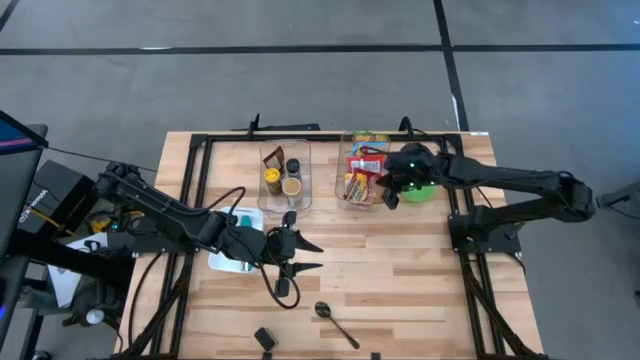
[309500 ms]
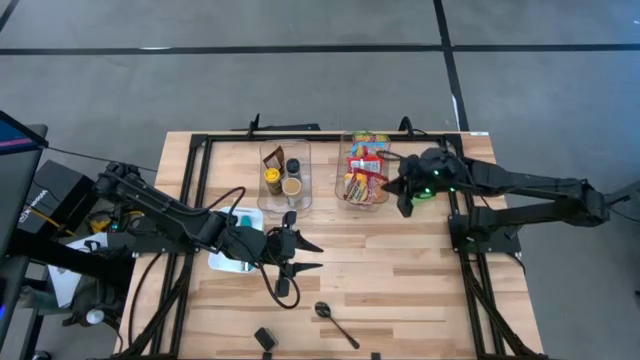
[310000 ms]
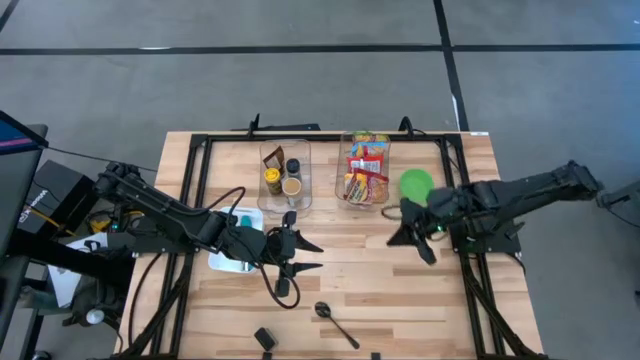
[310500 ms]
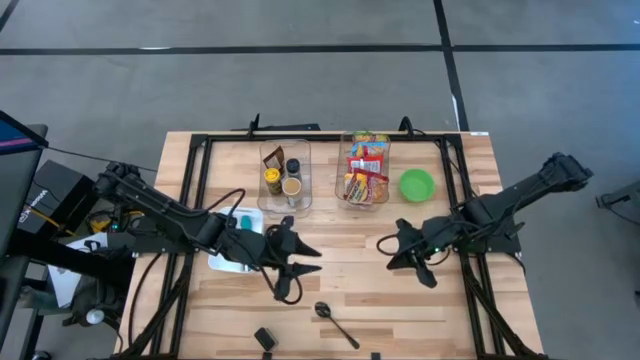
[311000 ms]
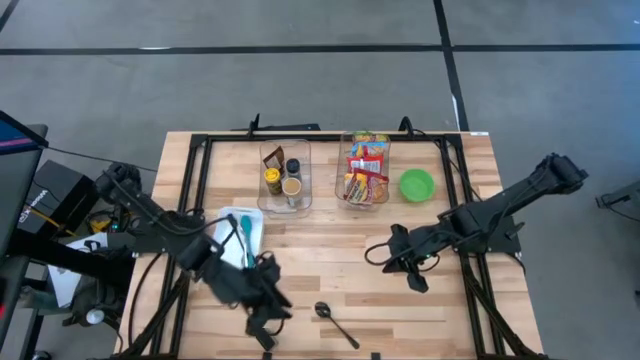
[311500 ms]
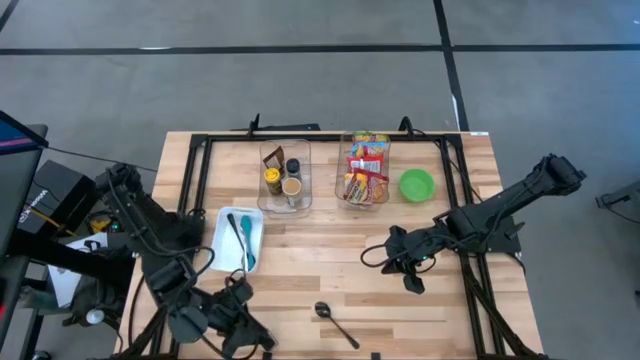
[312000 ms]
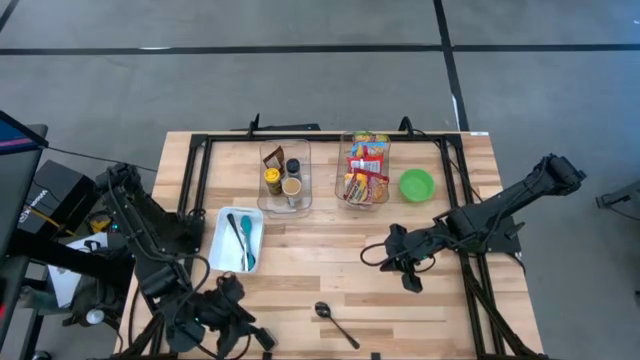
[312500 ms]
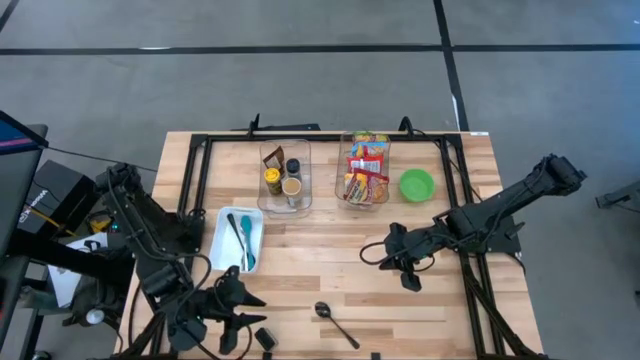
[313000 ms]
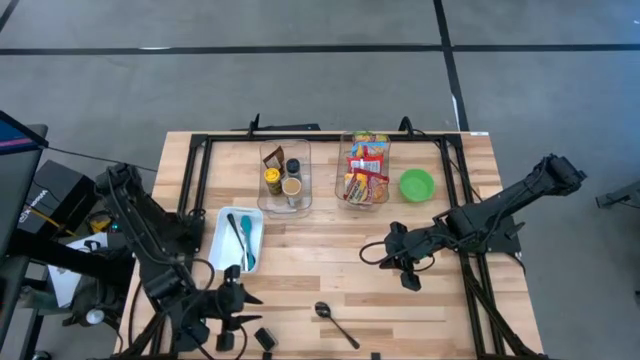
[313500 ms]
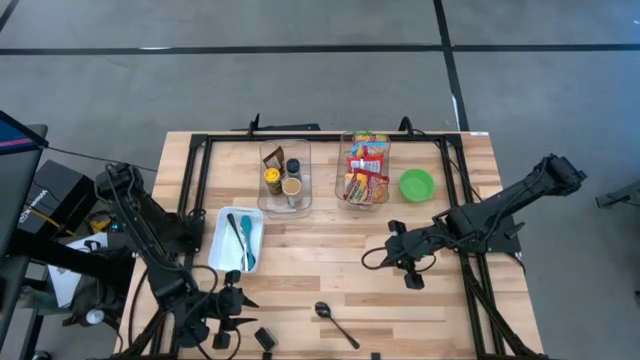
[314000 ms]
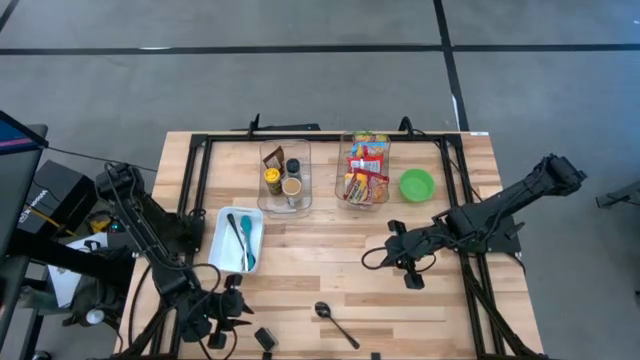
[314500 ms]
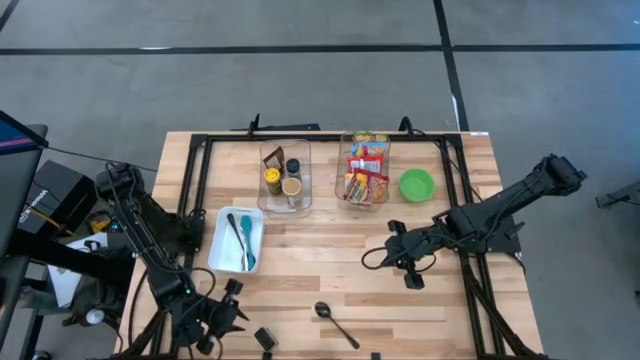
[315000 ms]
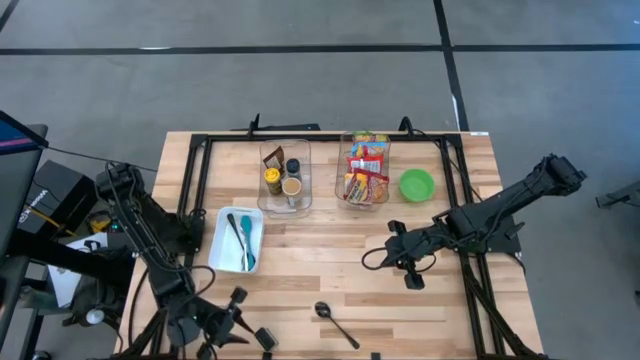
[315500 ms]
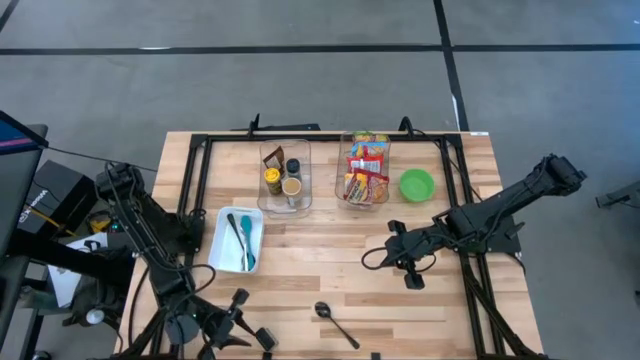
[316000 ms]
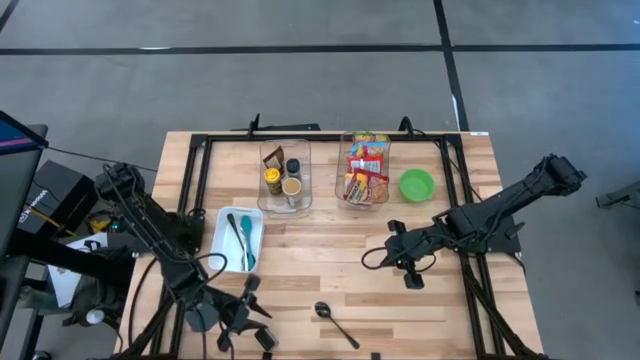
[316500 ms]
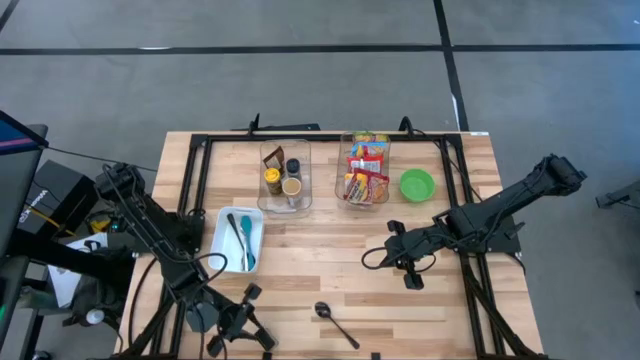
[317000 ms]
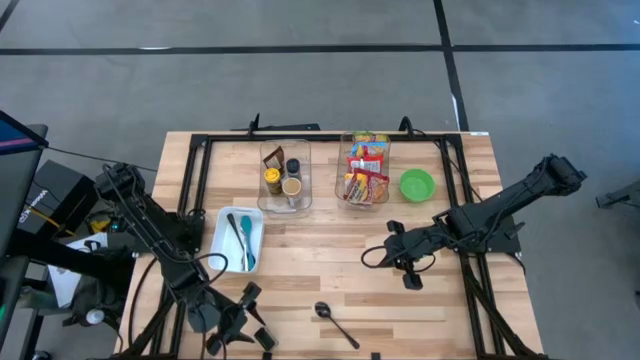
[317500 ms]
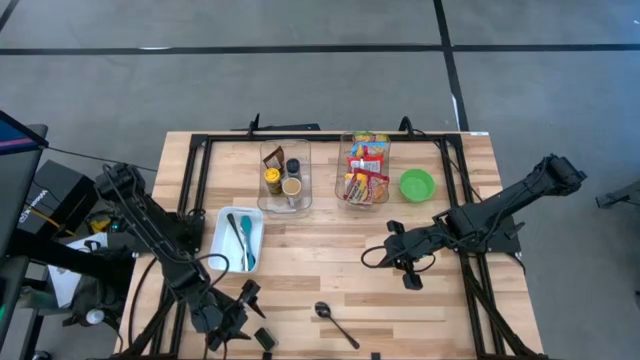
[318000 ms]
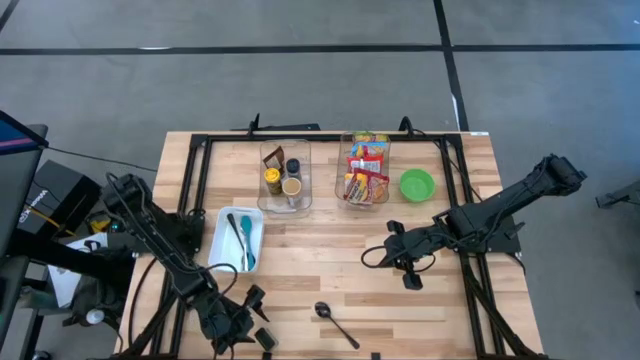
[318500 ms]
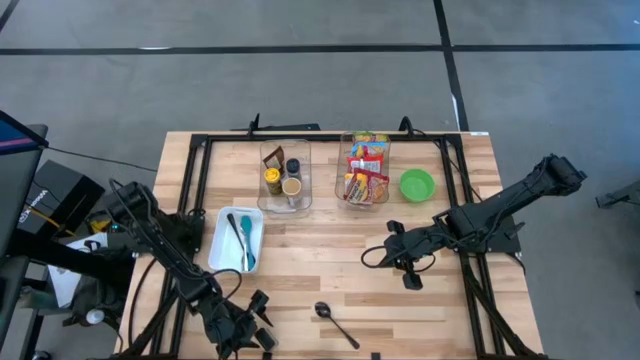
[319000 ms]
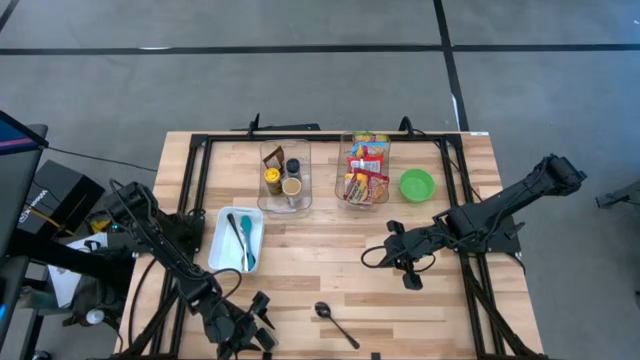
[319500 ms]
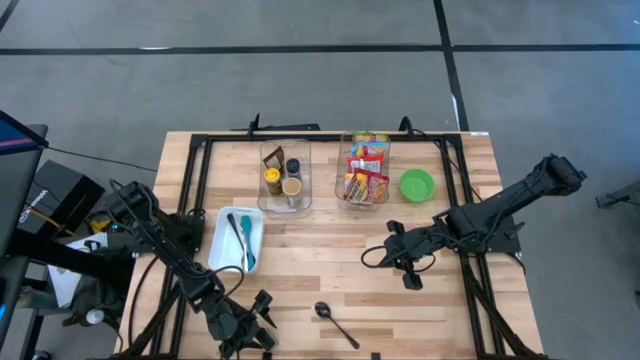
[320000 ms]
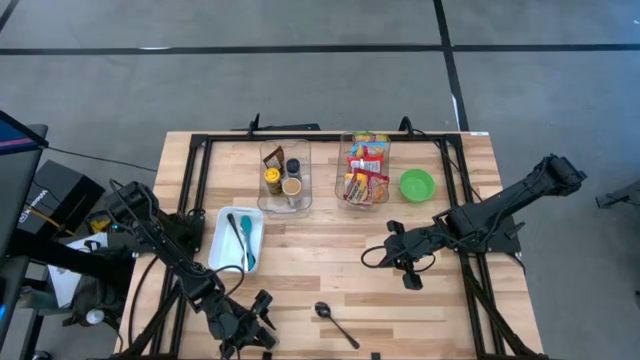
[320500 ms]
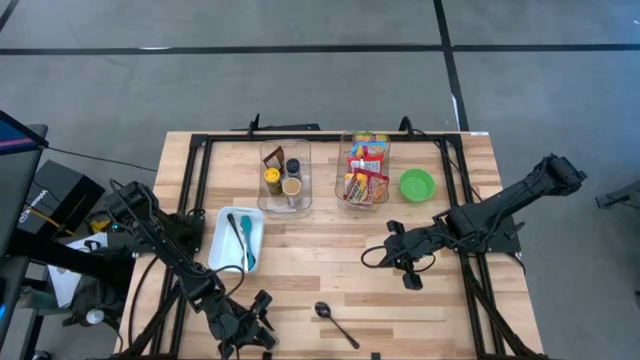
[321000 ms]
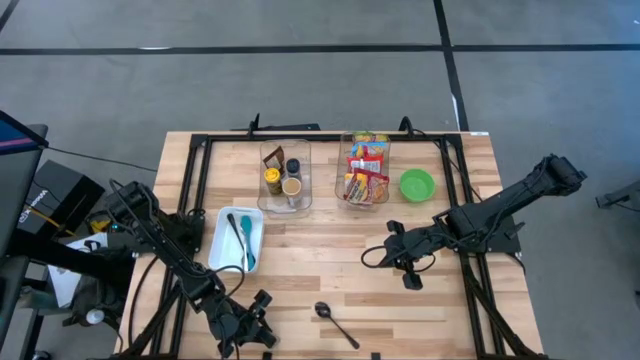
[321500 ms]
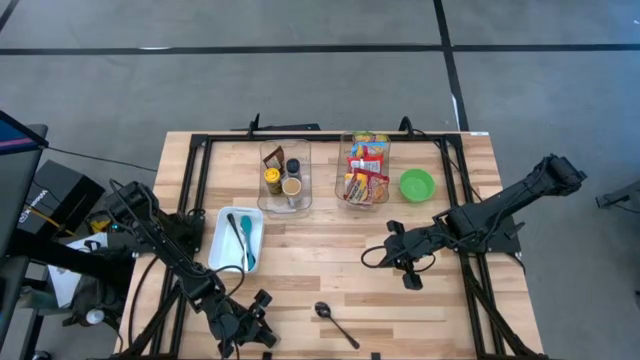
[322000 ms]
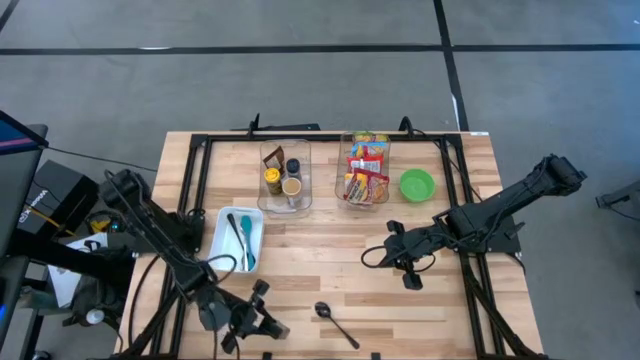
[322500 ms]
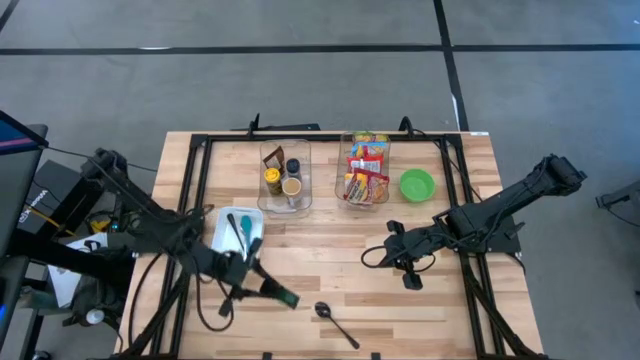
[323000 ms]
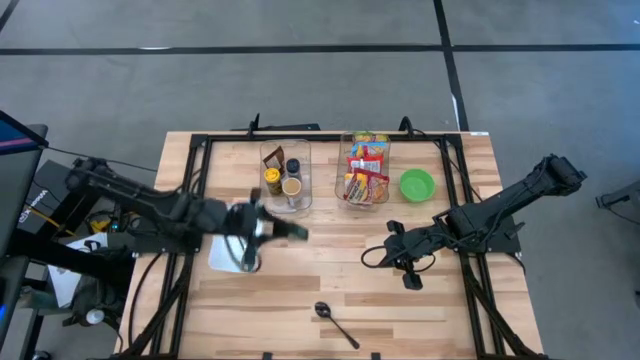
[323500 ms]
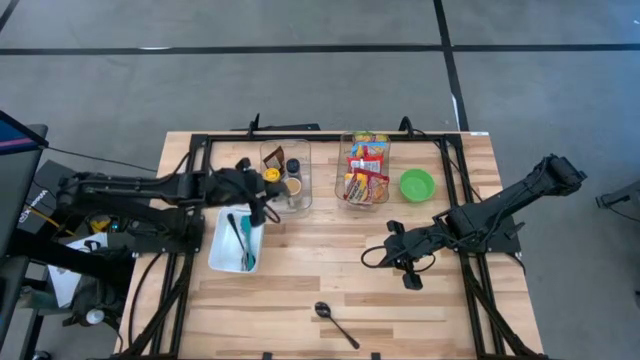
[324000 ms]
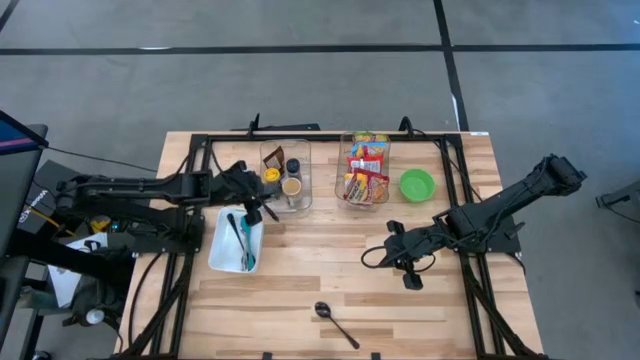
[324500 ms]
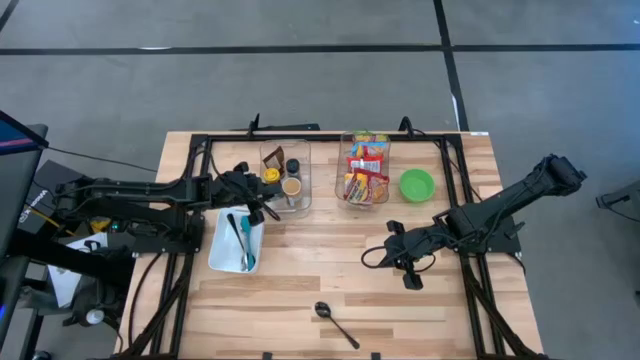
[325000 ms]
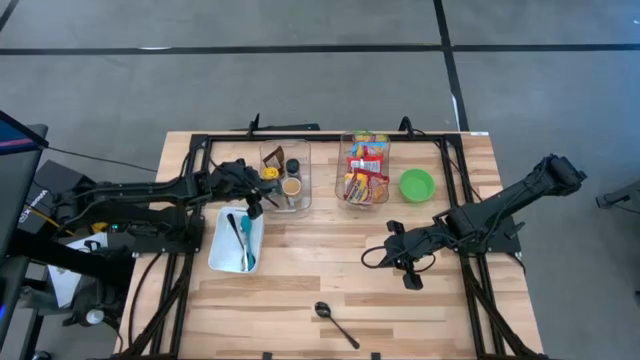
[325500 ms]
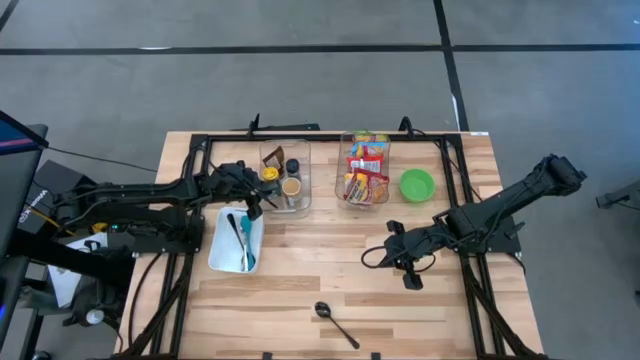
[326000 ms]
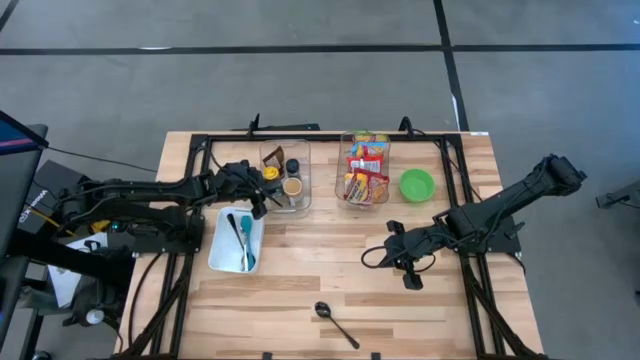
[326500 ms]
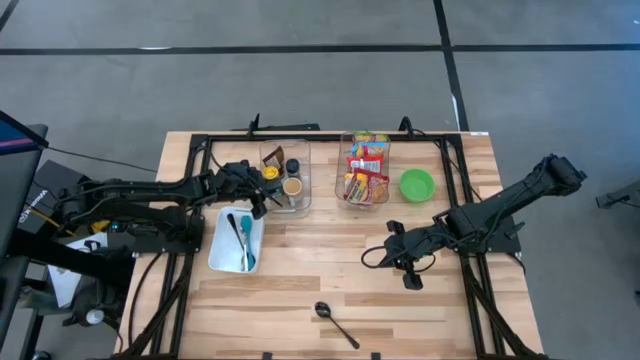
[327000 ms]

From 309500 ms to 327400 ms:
Task: Pick & Place Food Item
Put the black seasoning can into the left transparent bin

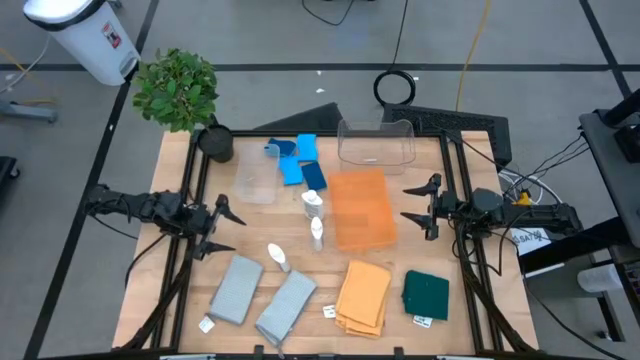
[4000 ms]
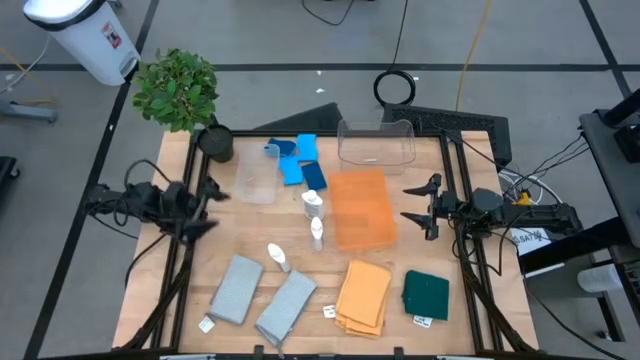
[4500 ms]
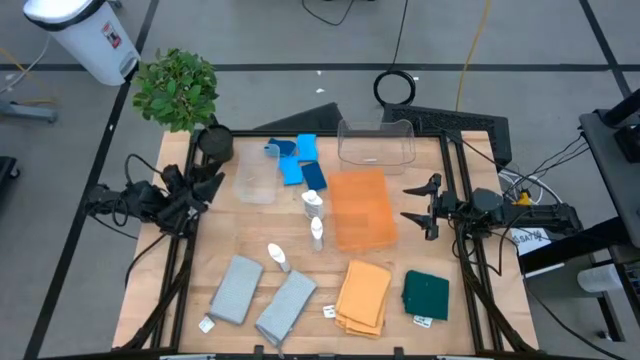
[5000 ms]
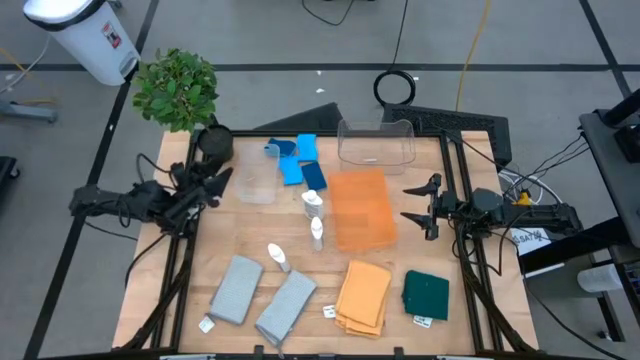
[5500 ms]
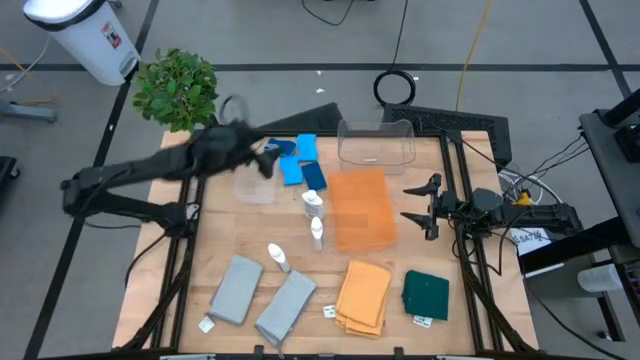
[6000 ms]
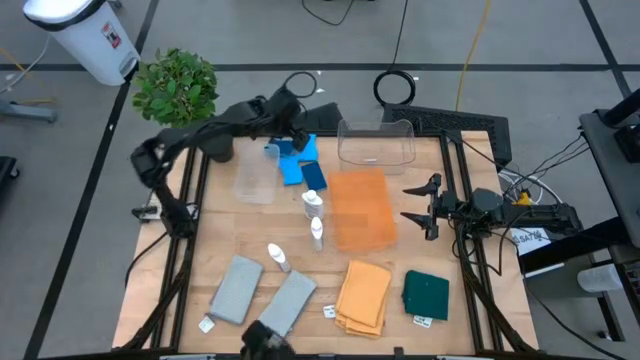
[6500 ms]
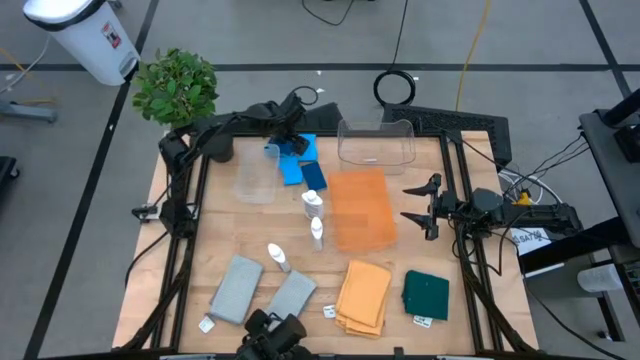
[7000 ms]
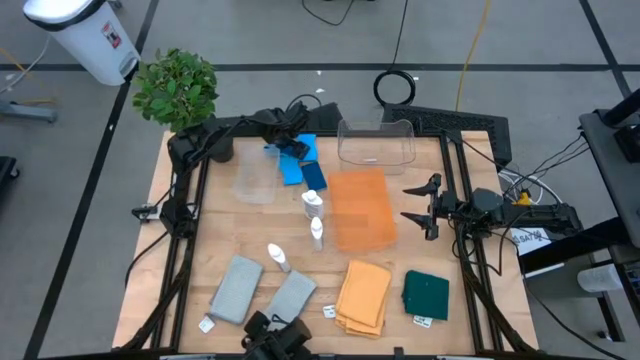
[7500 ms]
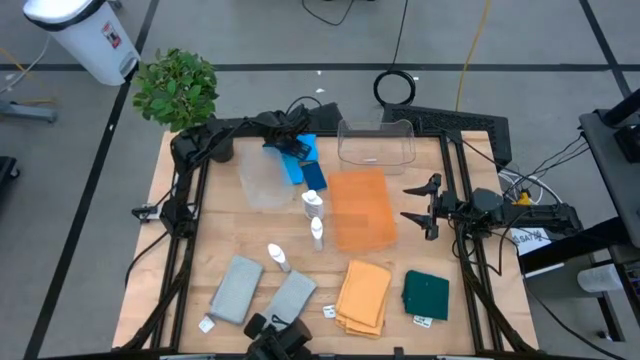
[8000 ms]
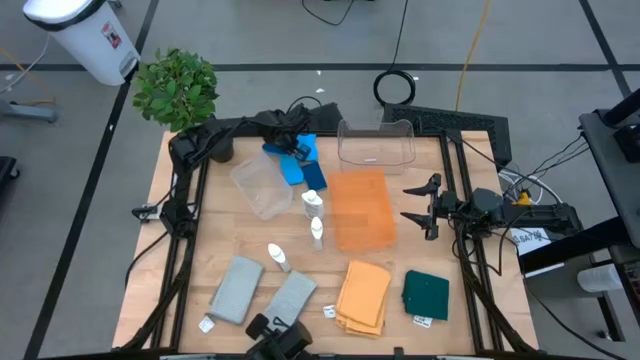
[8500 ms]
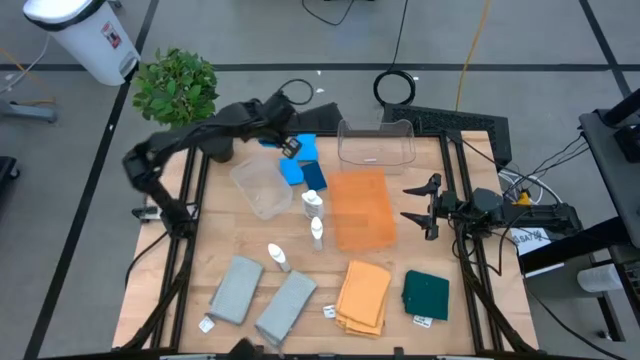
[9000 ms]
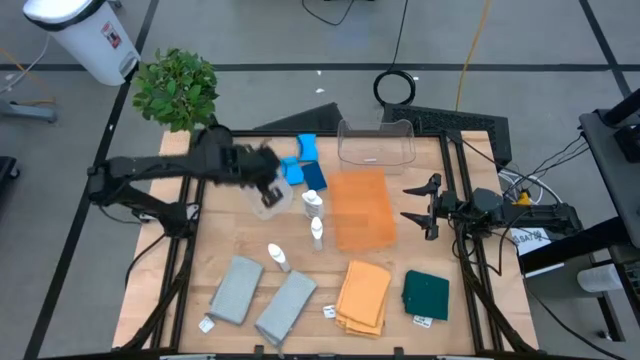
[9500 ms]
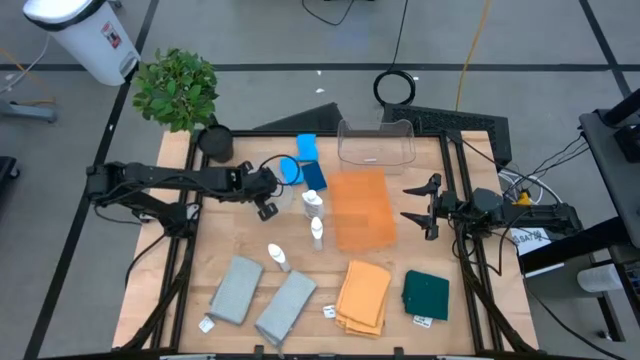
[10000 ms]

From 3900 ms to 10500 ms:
Task: Pick & Place Kitchen Items
Put the blue sponge into the white bin
